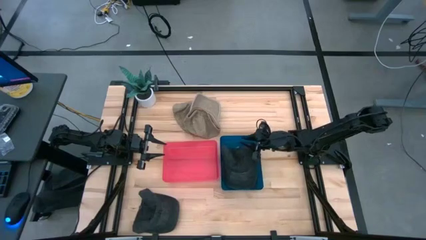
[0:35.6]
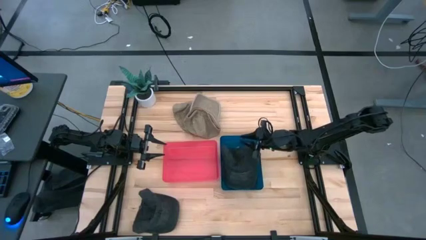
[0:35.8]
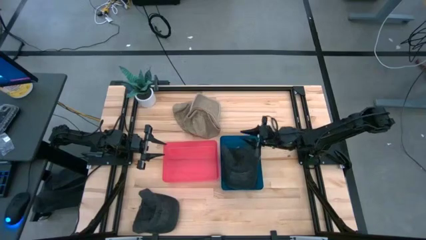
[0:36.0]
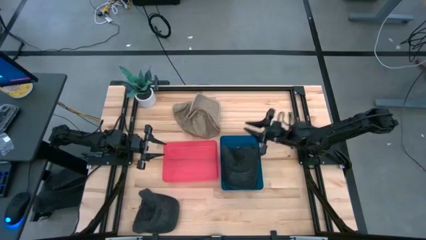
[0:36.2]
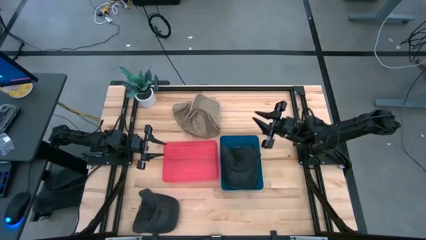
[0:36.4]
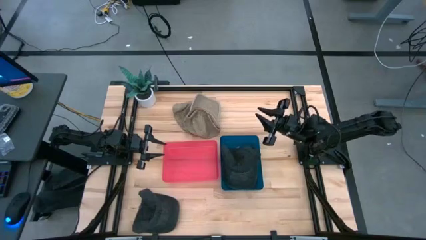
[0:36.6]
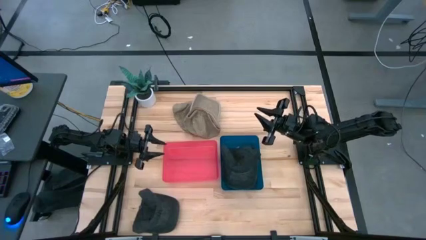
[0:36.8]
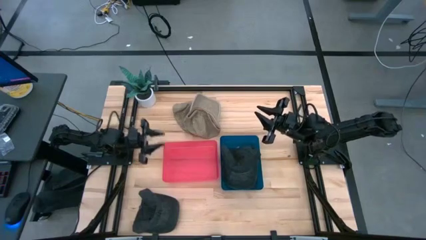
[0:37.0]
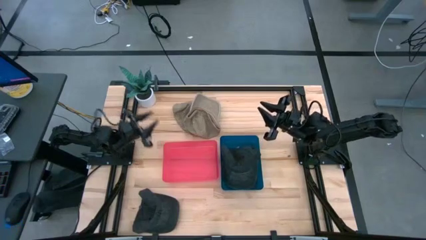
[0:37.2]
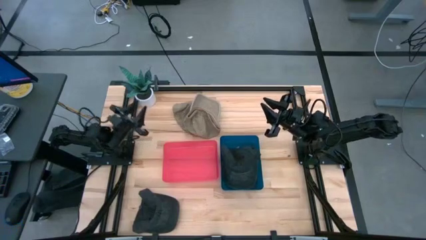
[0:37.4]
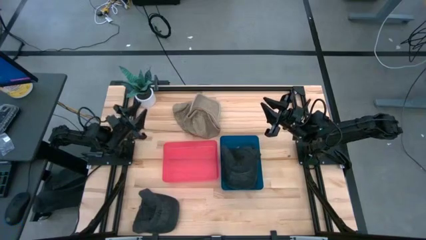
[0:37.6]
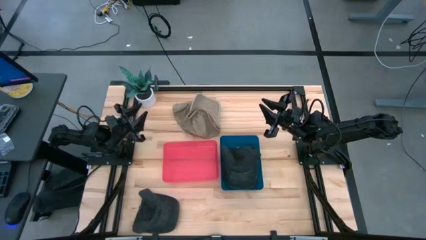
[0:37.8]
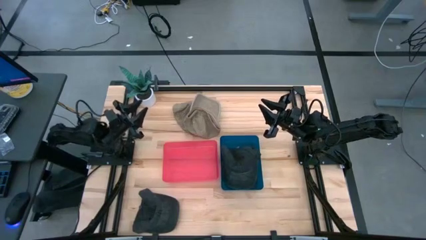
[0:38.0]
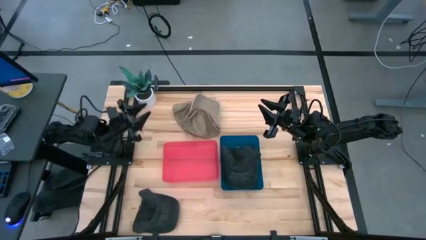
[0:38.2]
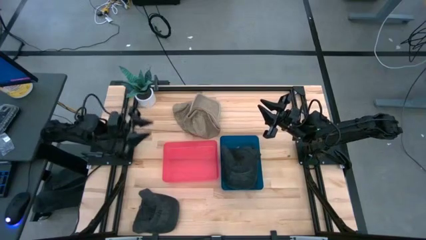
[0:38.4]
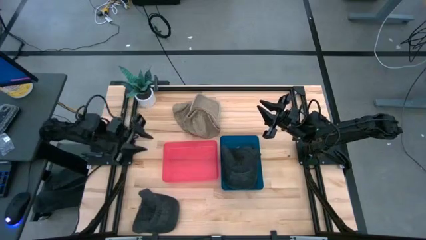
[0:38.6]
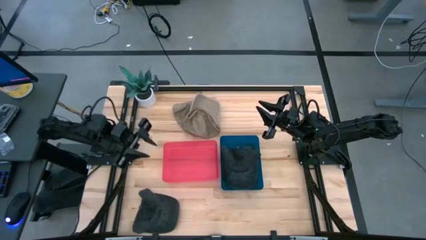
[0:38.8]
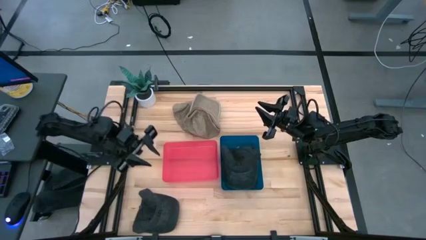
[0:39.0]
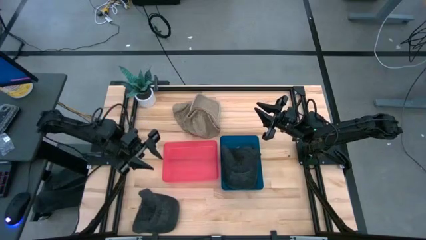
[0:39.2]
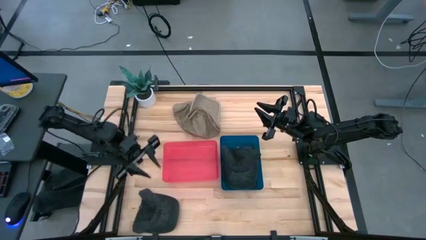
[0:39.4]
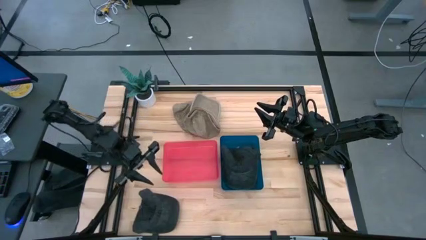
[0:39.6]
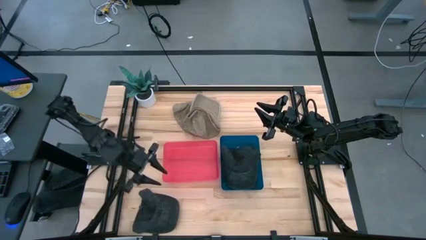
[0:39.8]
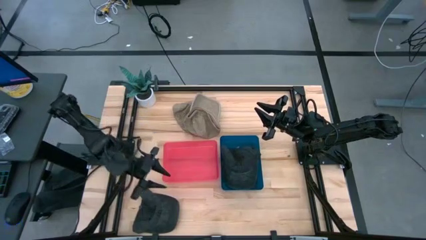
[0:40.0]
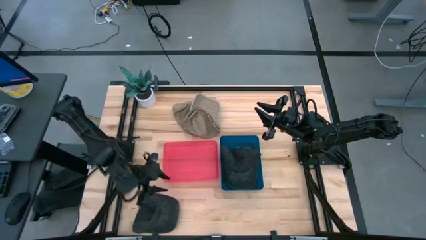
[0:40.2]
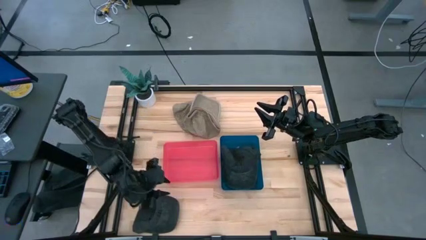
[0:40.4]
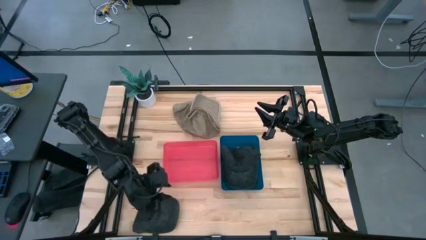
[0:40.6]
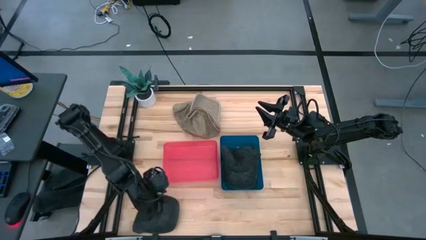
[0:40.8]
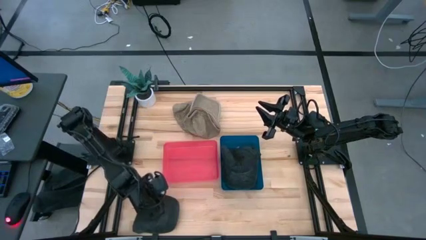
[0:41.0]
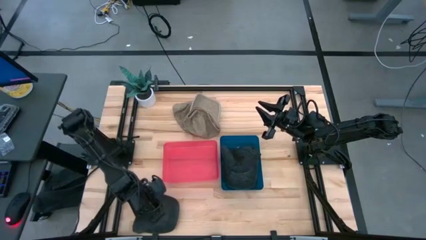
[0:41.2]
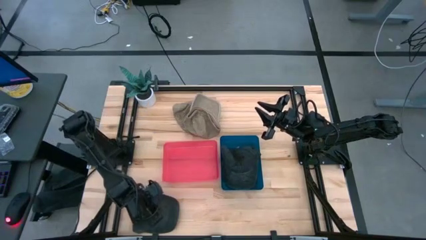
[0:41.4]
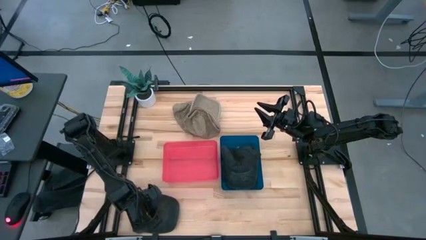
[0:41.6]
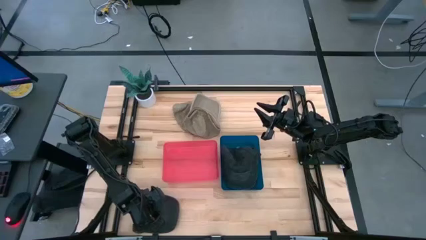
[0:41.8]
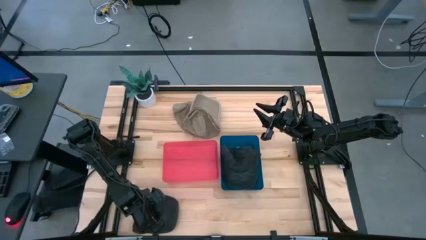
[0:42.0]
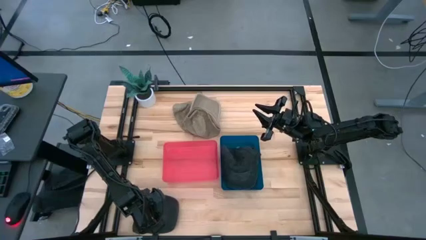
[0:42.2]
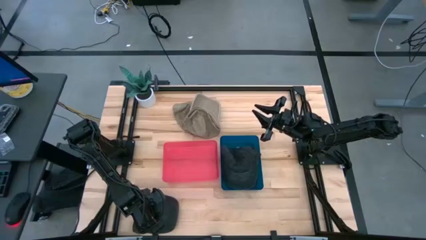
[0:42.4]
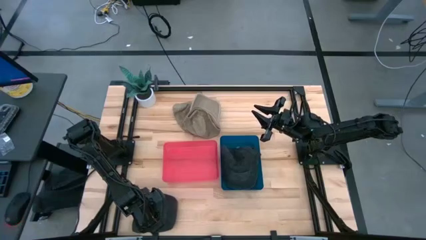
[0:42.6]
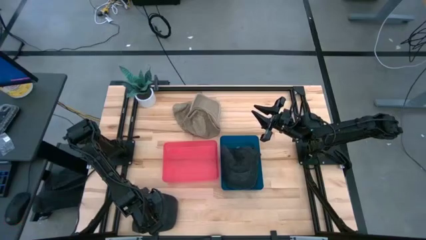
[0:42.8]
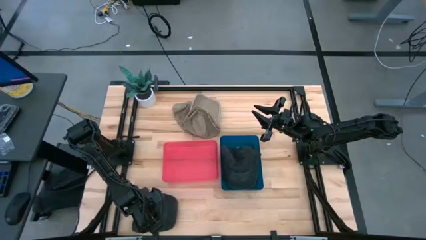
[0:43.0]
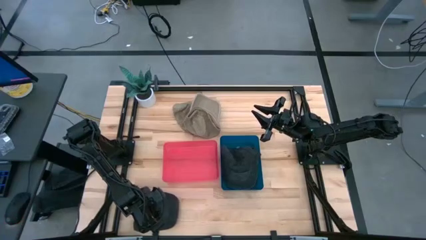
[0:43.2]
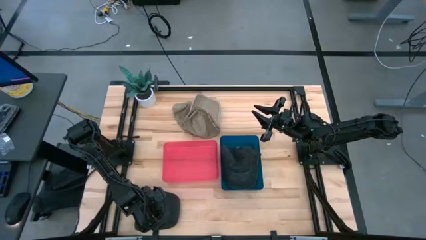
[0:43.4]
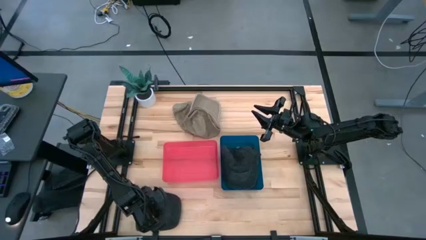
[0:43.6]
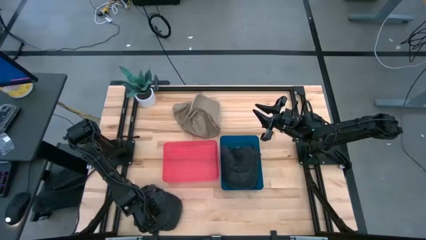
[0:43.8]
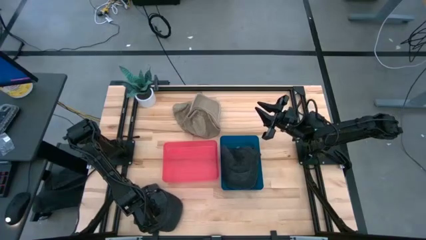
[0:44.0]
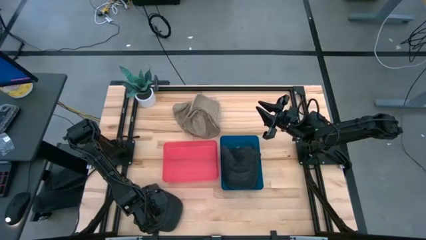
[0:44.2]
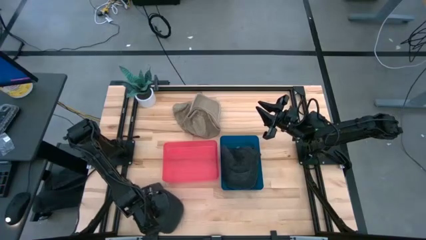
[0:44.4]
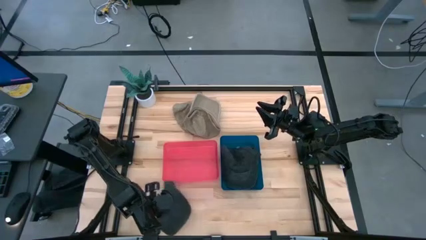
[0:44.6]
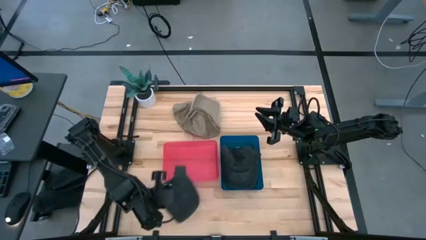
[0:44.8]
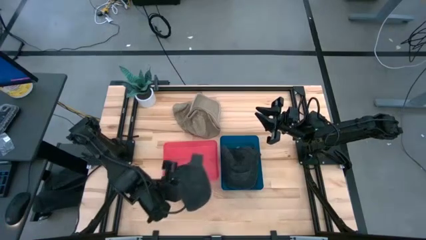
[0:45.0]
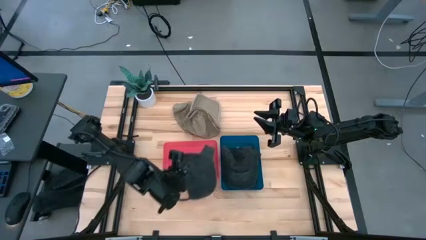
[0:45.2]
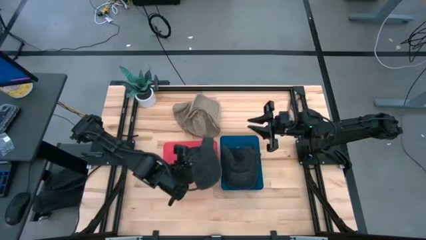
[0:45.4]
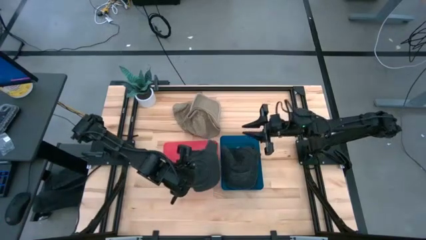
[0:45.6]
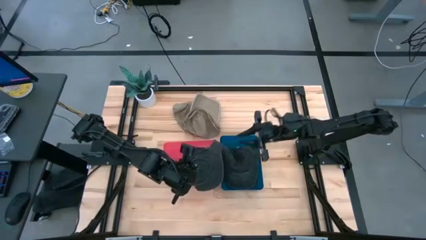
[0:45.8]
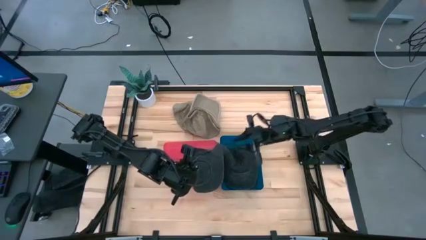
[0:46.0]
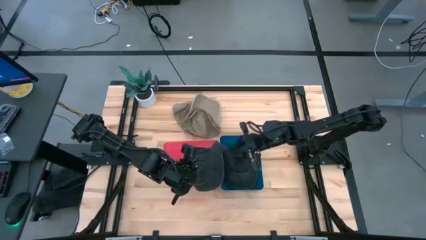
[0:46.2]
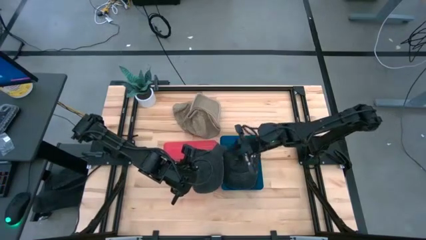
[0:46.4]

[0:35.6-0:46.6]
Task: Pick & Place hat
Put the black cap into the blue bin
